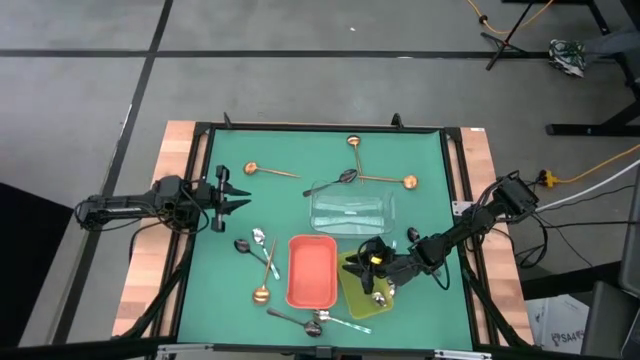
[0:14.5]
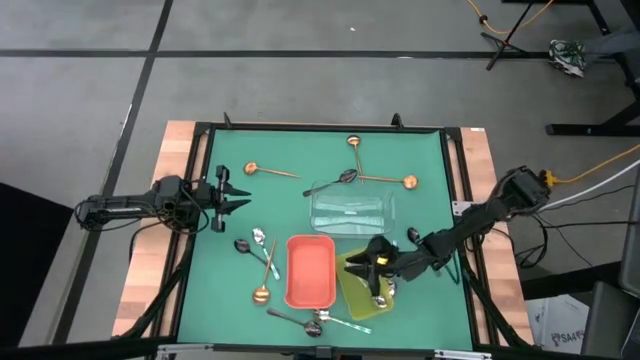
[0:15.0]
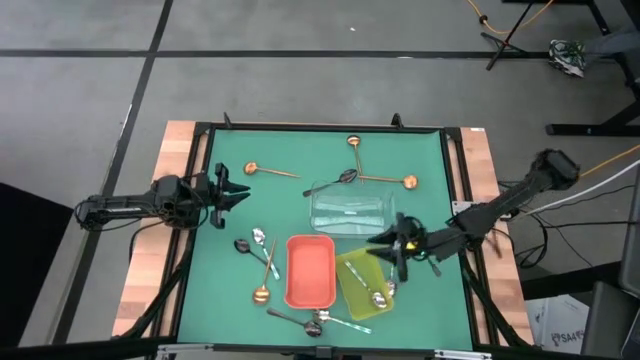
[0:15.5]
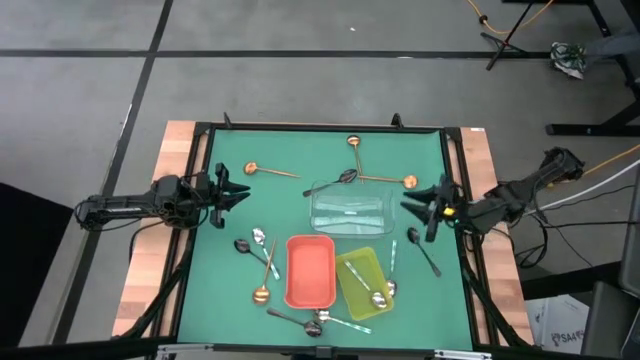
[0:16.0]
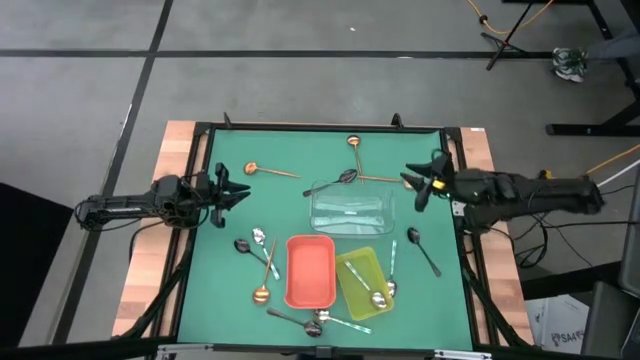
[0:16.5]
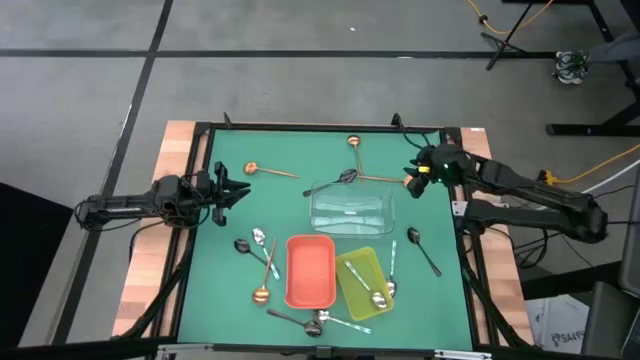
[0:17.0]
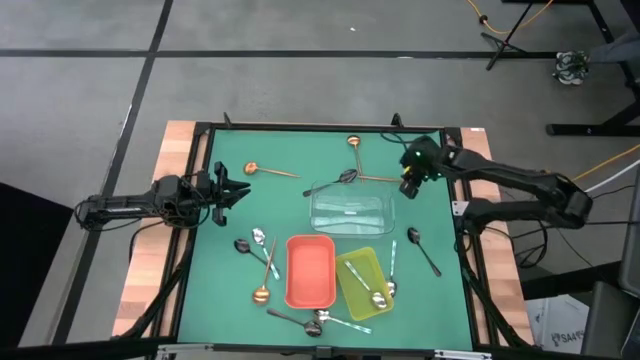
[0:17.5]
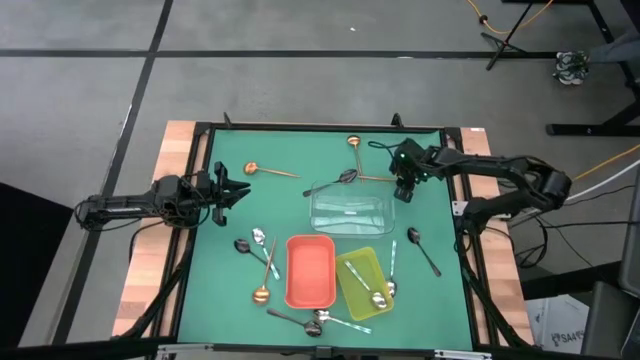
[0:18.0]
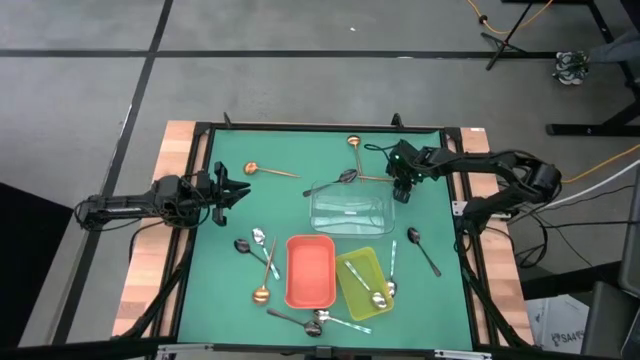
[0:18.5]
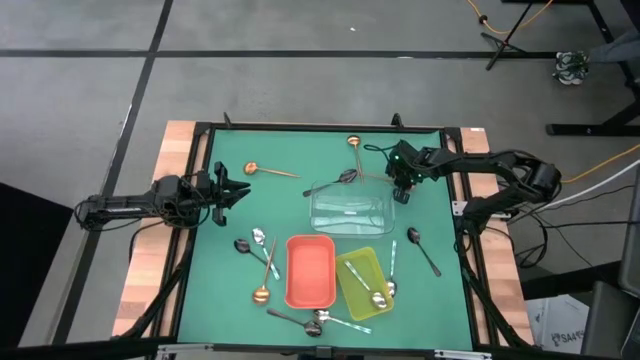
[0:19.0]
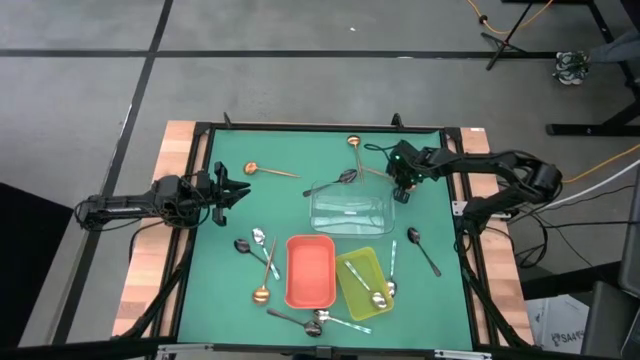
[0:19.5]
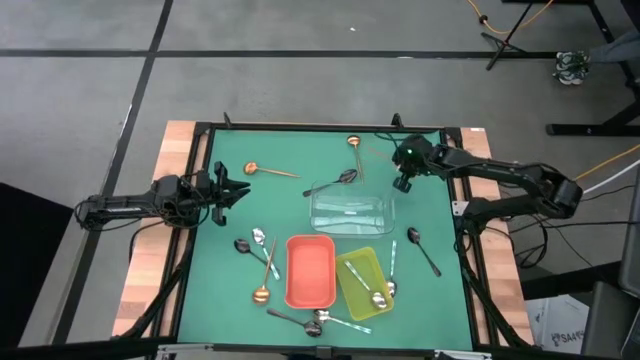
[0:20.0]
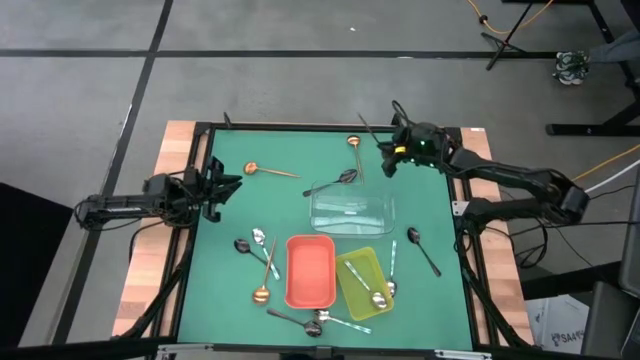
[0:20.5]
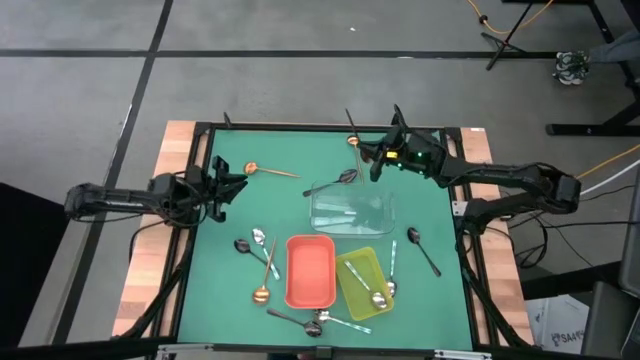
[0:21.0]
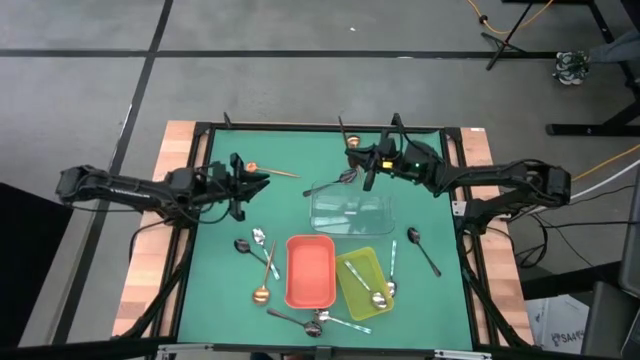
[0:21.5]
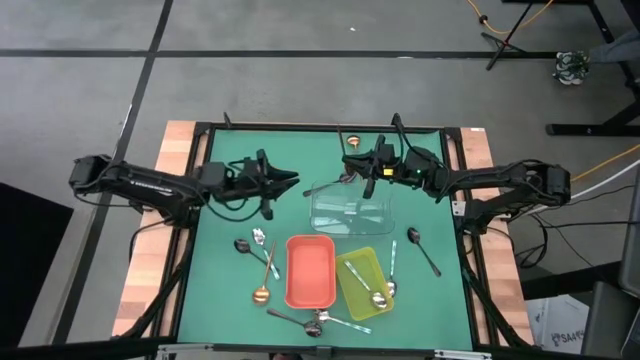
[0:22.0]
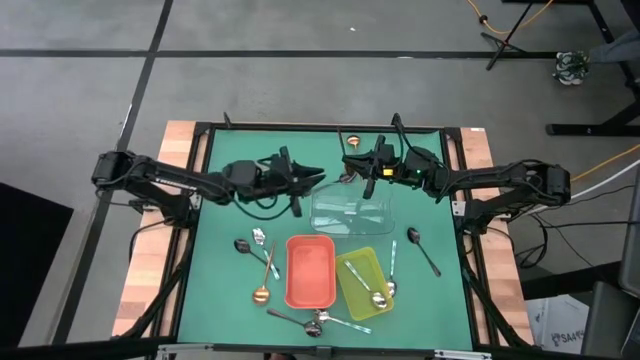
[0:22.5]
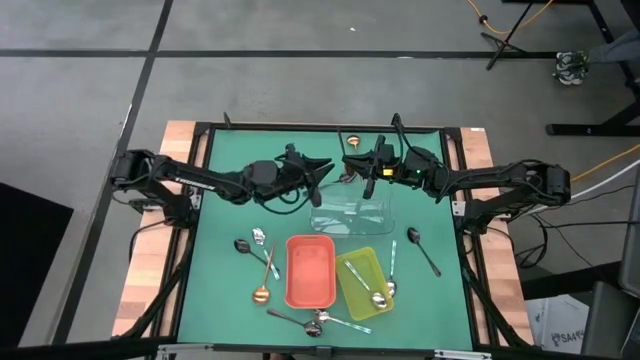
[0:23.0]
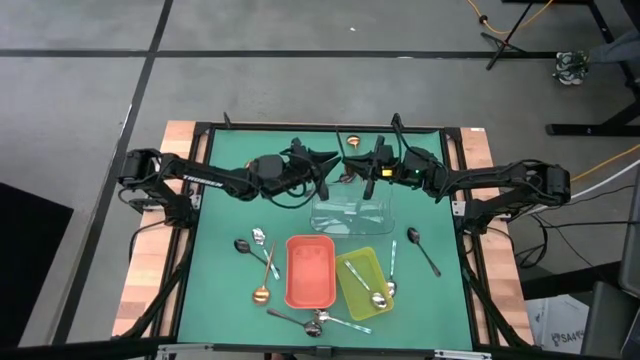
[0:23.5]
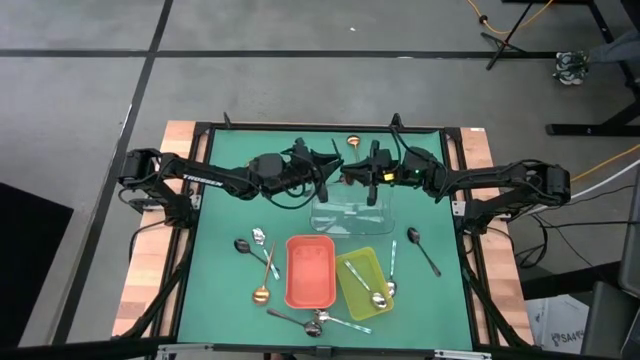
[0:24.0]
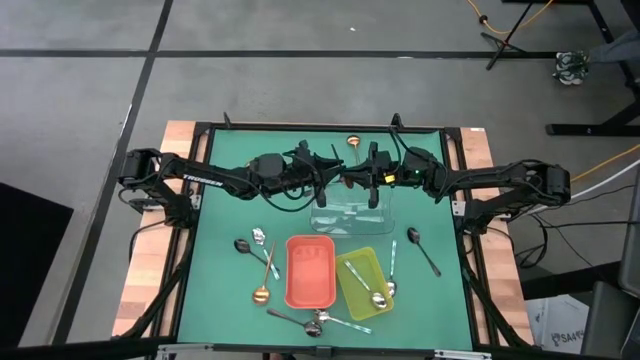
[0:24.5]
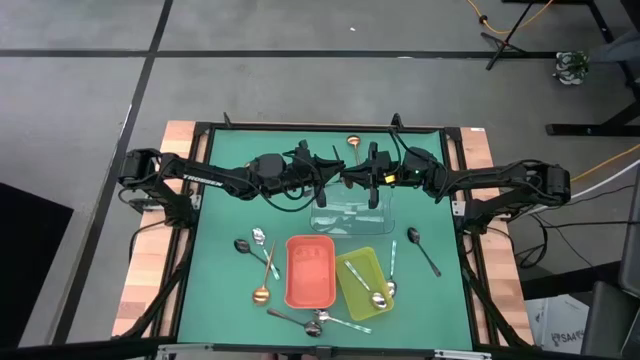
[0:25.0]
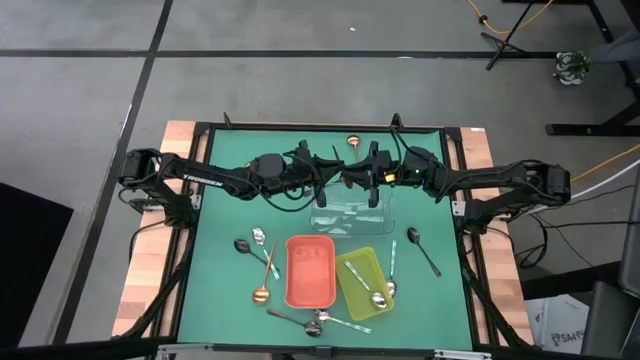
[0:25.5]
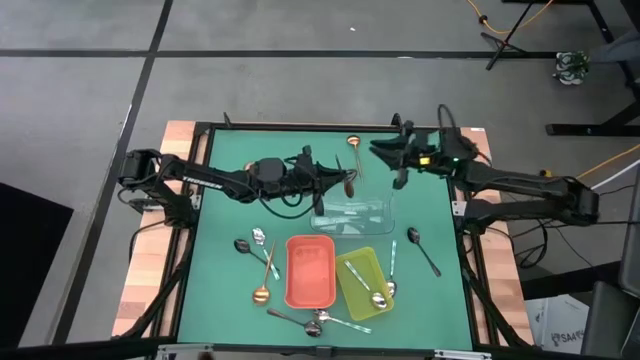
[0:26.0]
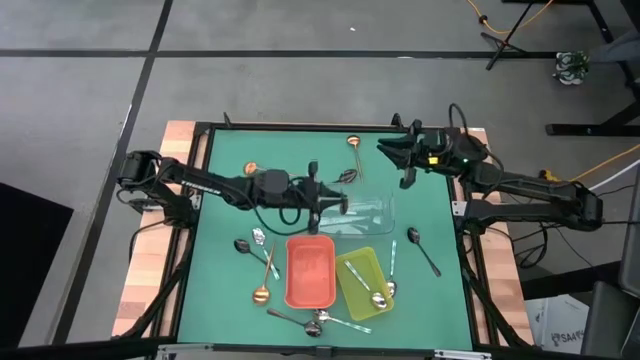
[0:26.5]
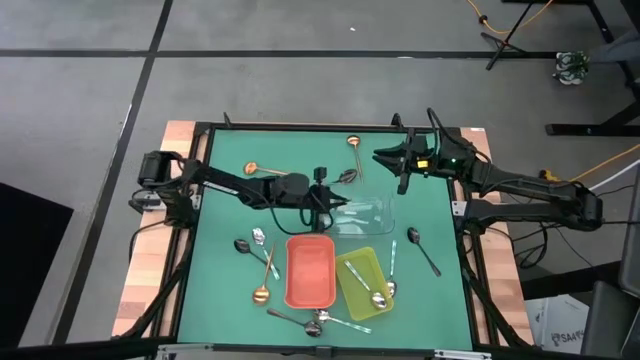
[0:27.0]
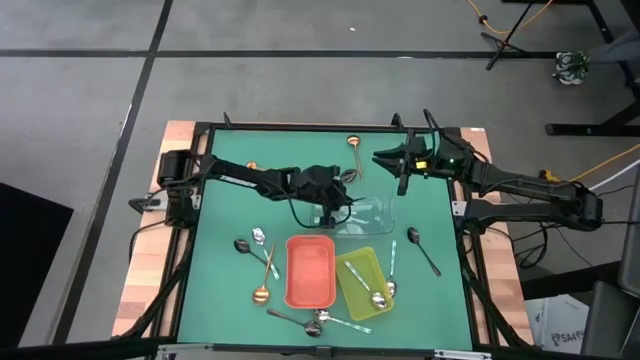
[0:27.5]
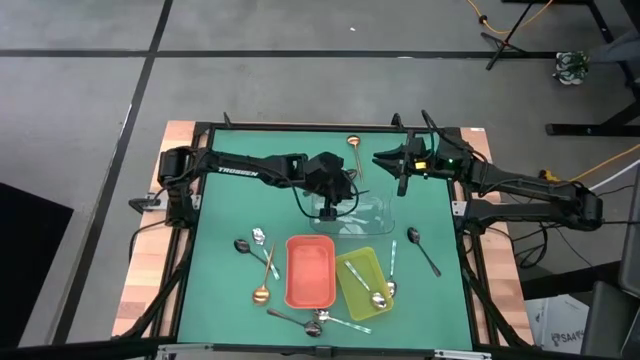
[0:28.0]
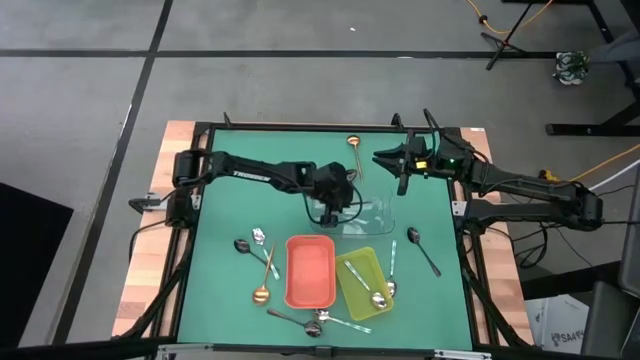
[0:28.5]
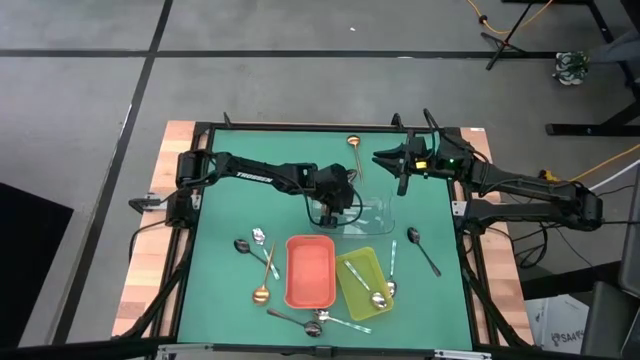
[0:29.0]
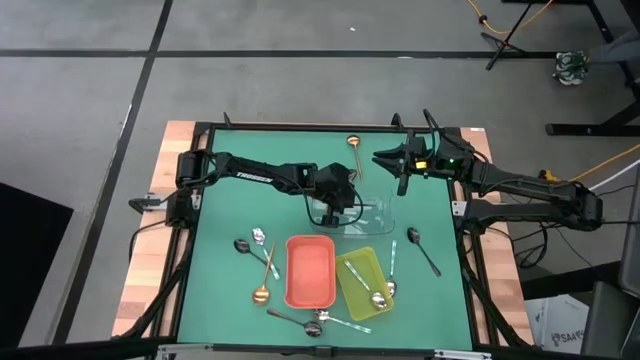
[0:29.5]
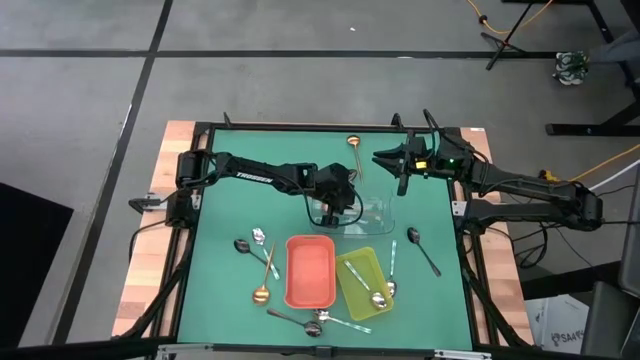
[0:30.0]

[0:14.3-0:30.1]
Task: Sort silverware by color (type)
Put the gold spoon into the transparent bin

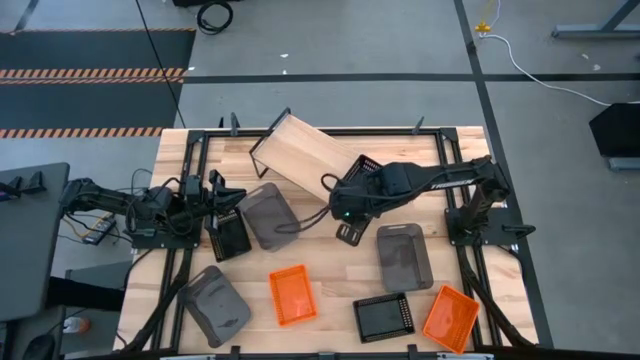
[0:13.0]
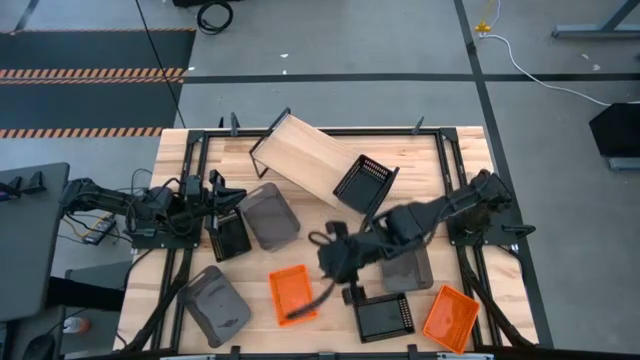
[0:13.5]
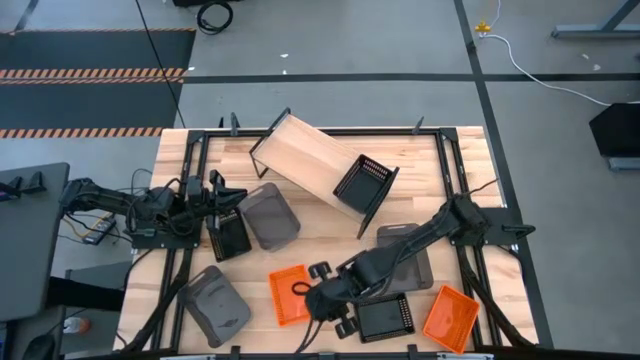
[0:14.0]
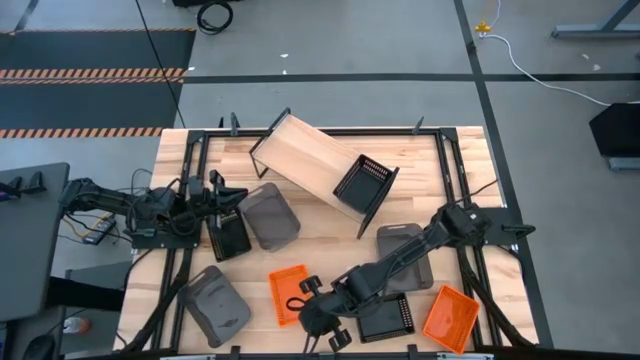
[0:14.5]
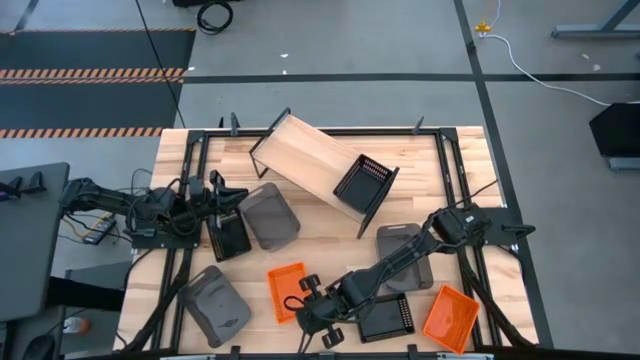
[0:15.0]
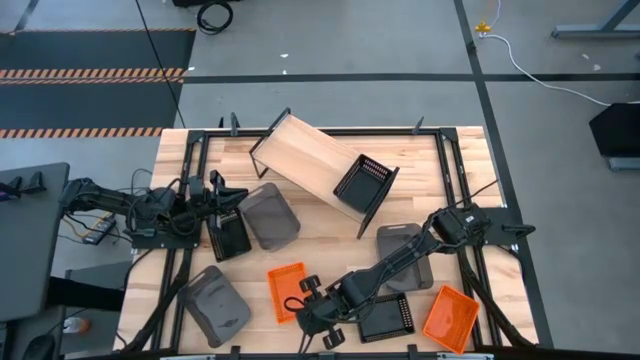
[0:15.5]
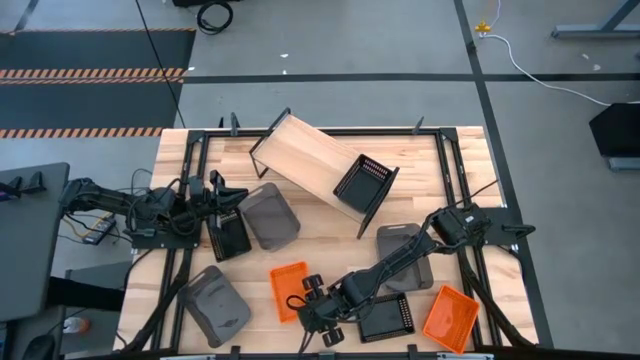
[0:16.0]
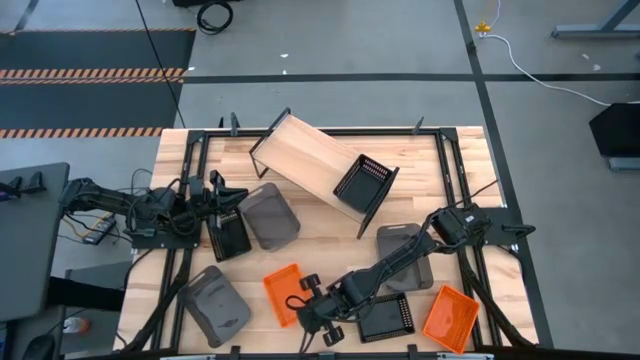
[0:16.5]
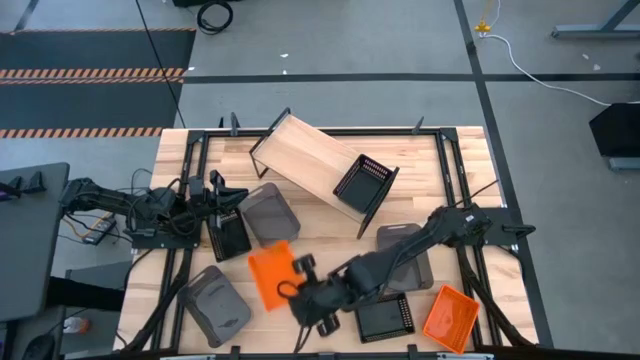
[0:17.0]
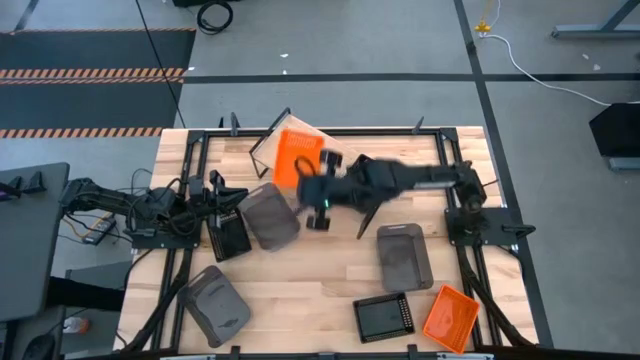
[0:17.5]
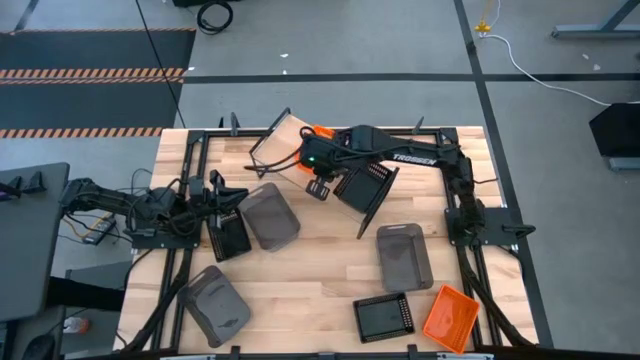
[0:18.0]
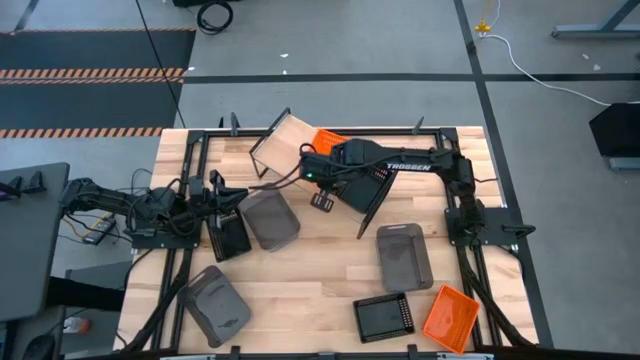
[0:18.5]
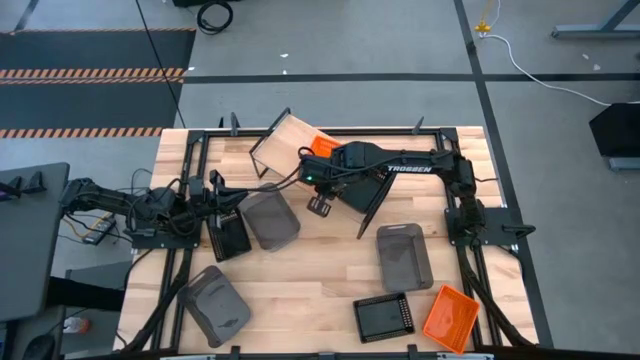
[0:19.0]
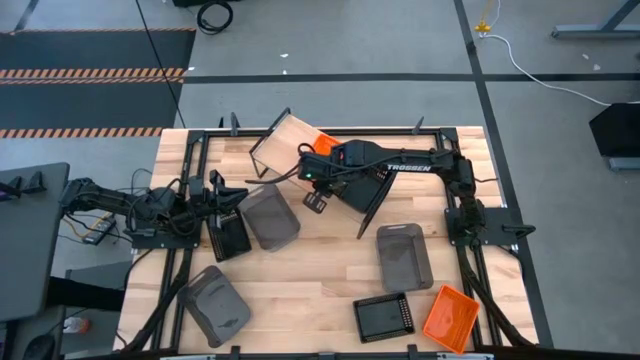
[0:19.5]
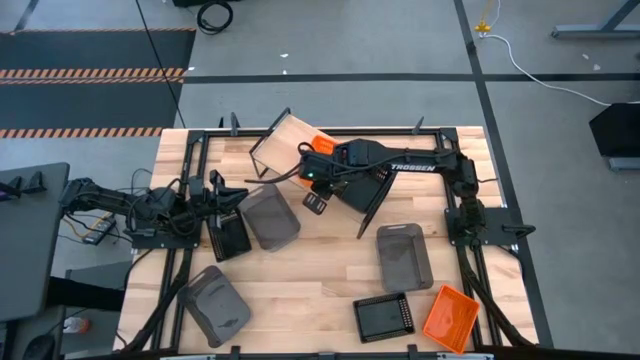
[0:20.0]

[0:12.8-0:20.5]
Task: Stack baskets on shelf by color
Put the left orange basket on the shelf
